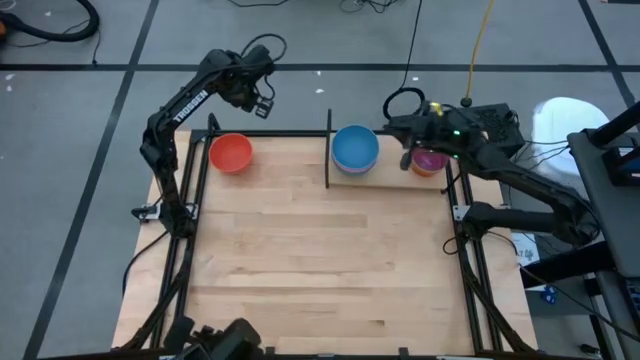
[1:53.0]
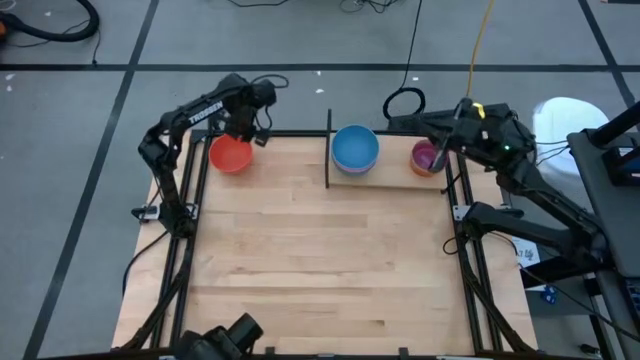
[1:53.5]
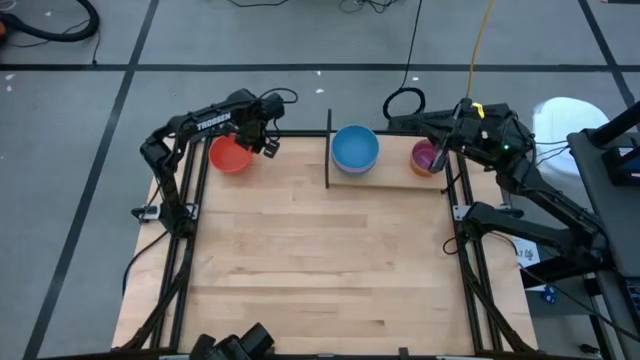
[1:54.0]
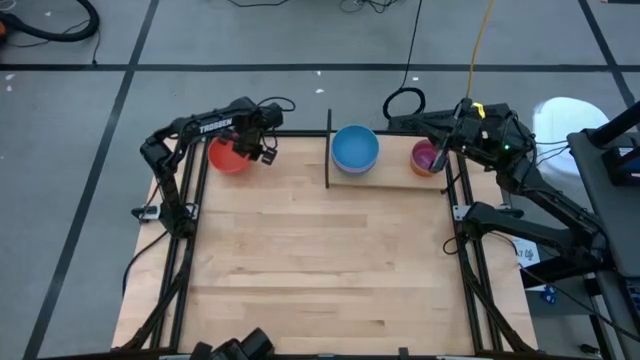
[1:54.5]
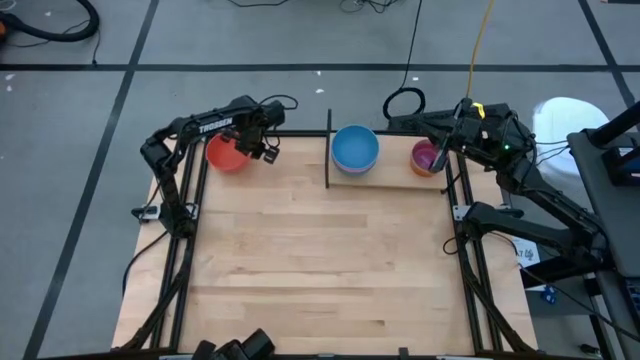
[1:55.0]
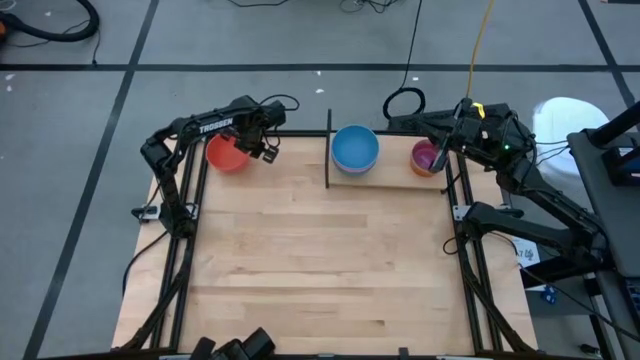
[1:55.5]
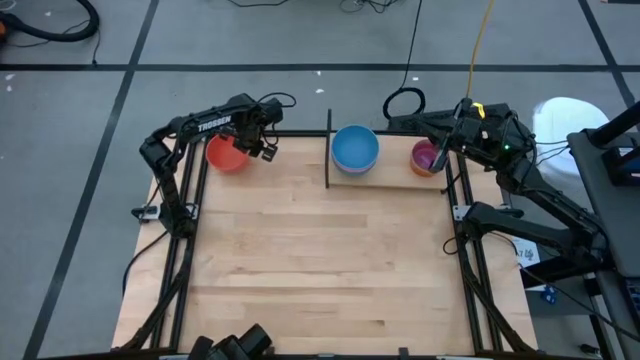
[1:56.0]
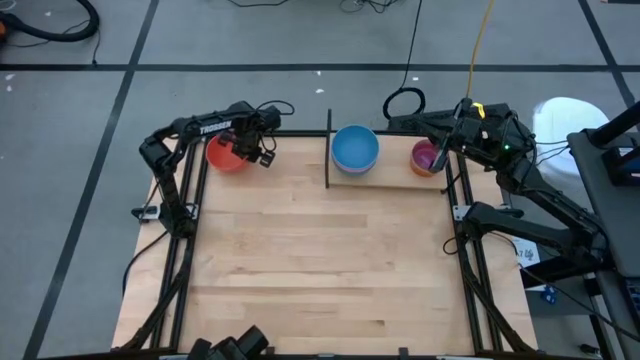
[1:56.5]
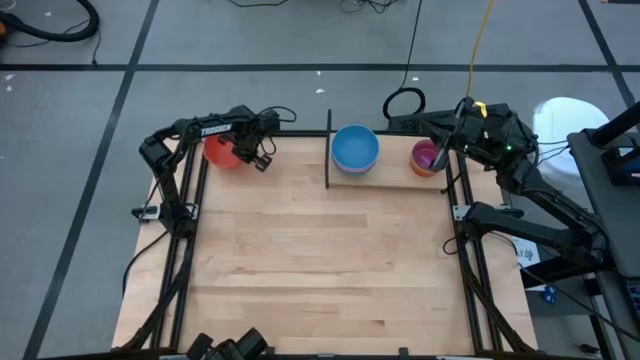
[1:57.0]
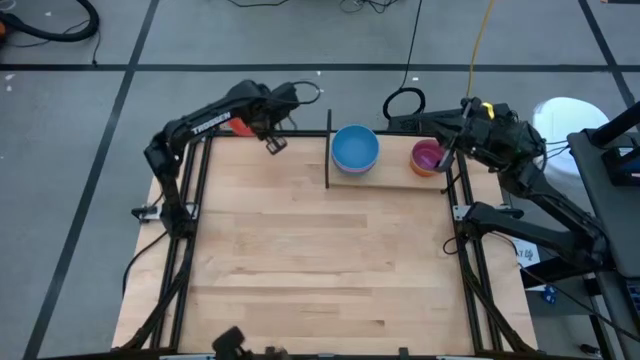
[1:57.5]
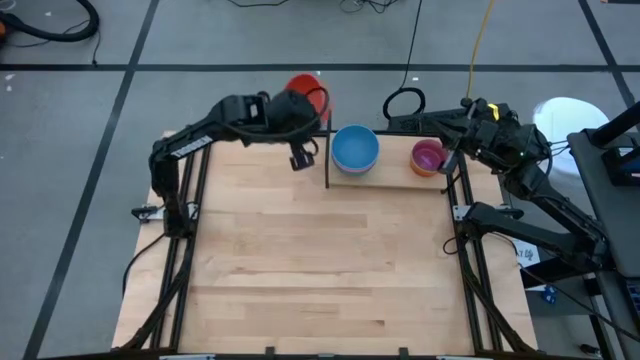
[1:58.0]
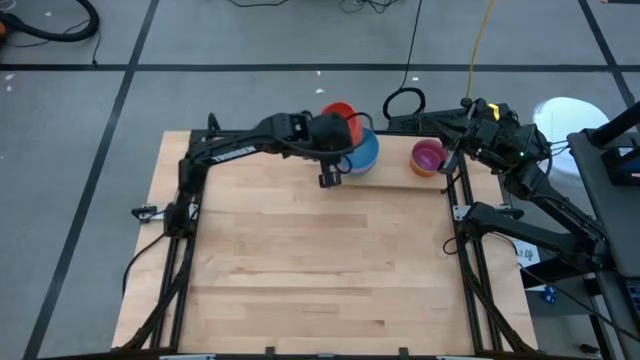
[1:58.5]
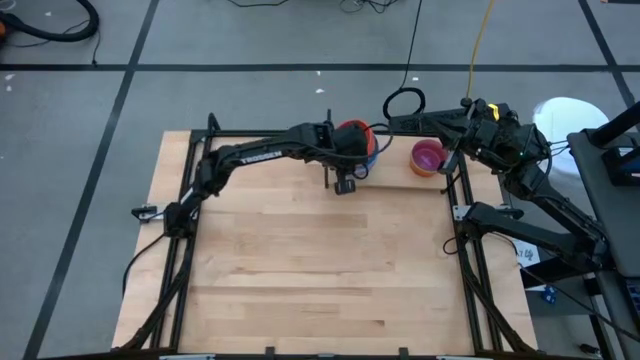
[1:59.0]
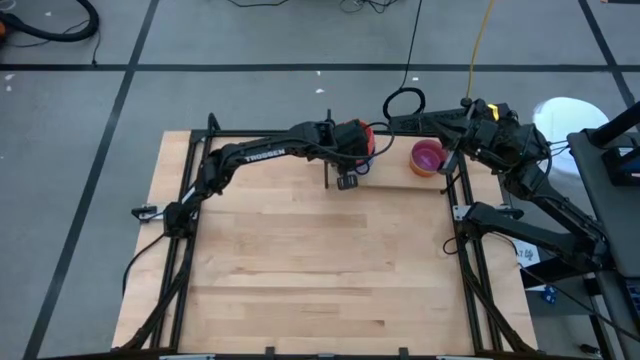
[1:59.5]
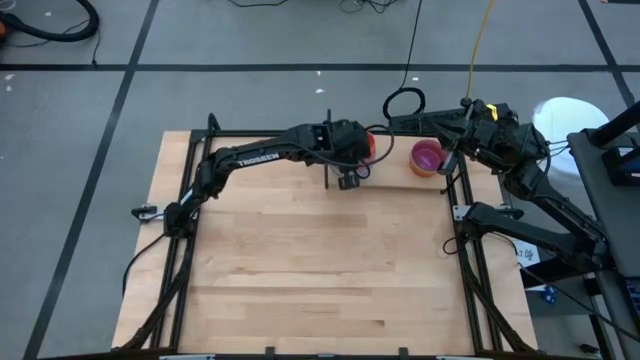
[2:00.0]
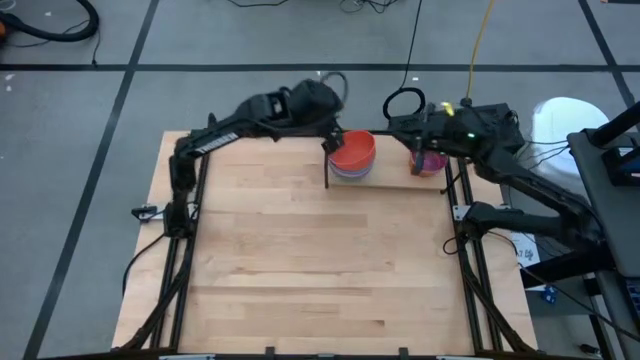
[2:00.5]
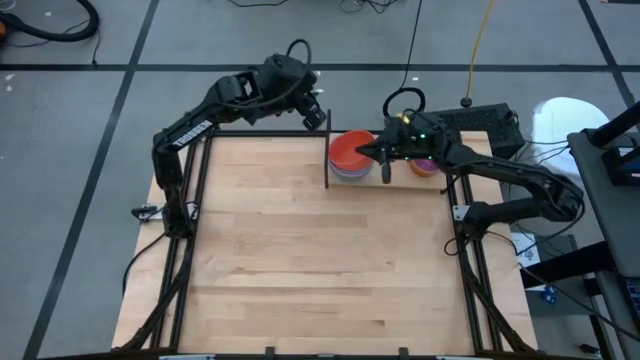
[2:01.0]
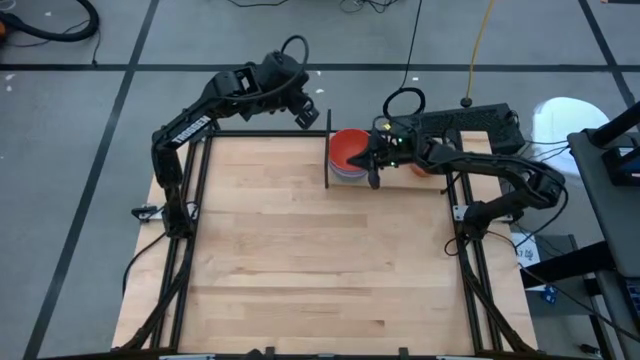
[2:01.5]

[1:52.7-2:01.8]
Task: Place and stack bowls onto a shelf
Stack the large orange bowl on top of the large blue bowl on the shelf

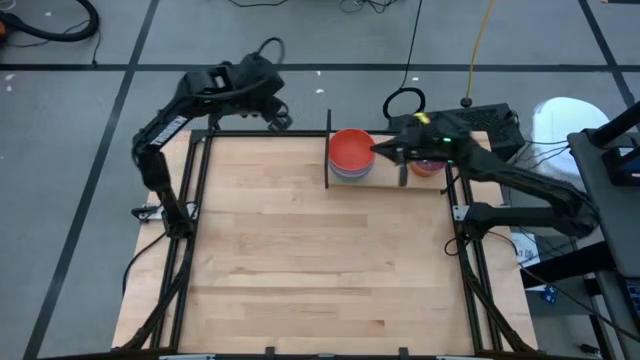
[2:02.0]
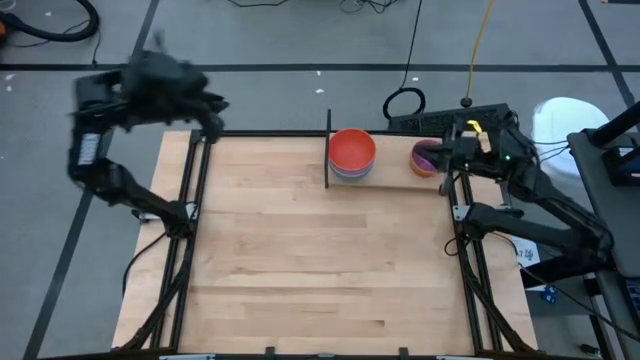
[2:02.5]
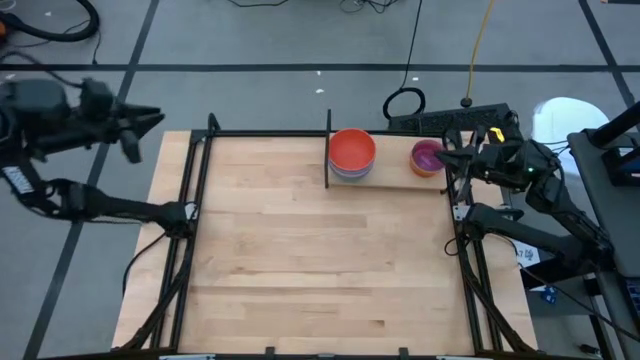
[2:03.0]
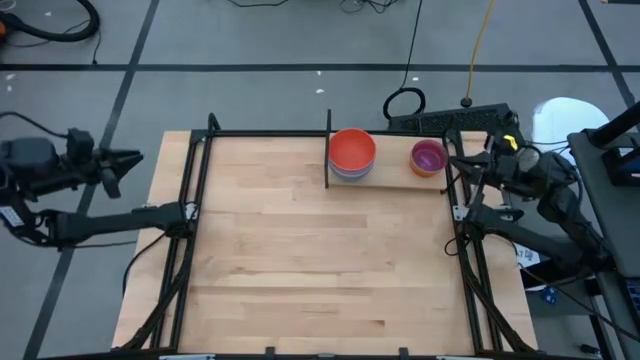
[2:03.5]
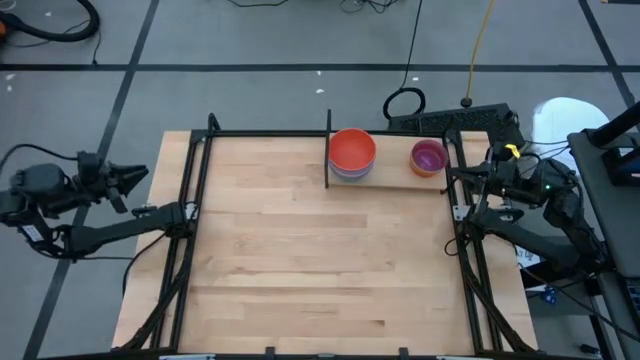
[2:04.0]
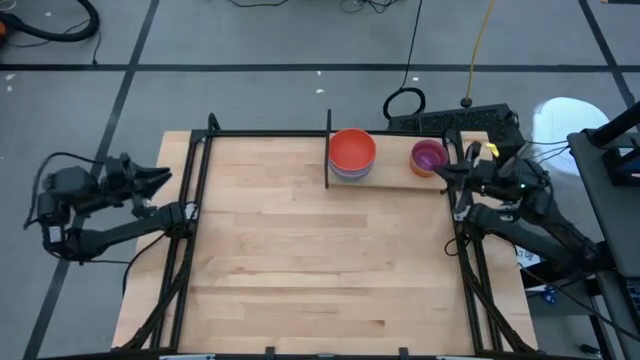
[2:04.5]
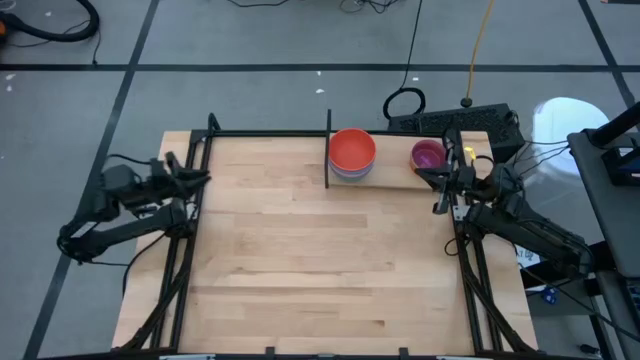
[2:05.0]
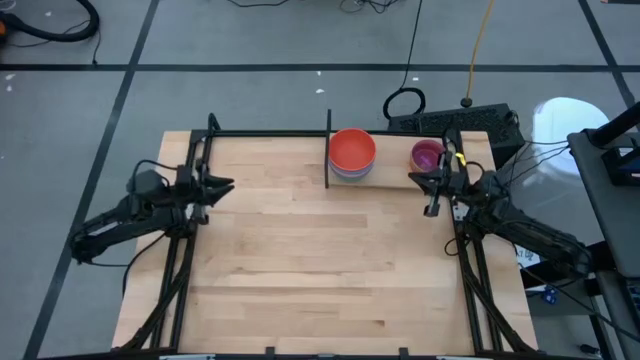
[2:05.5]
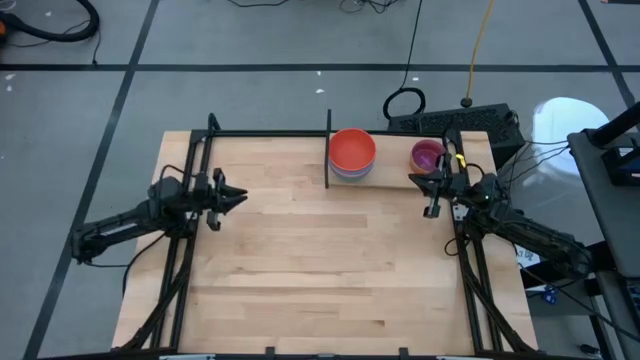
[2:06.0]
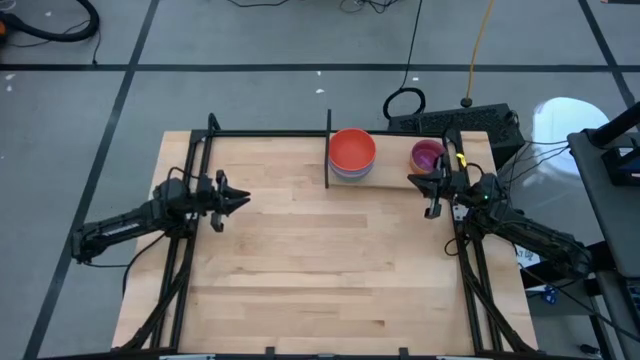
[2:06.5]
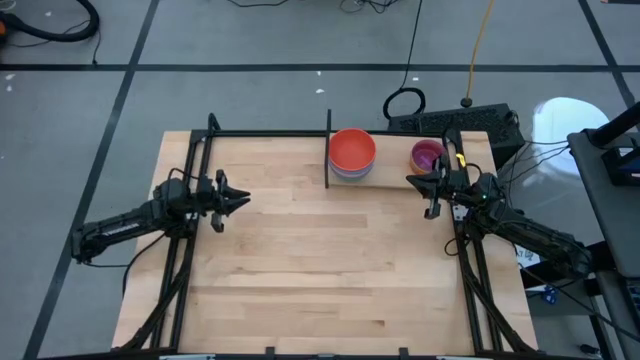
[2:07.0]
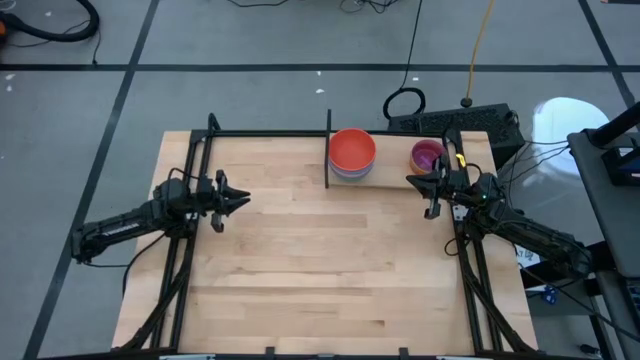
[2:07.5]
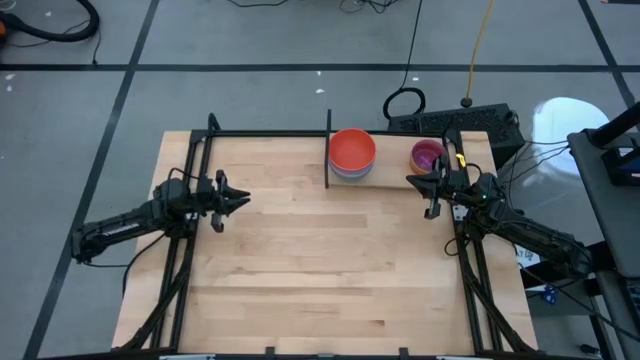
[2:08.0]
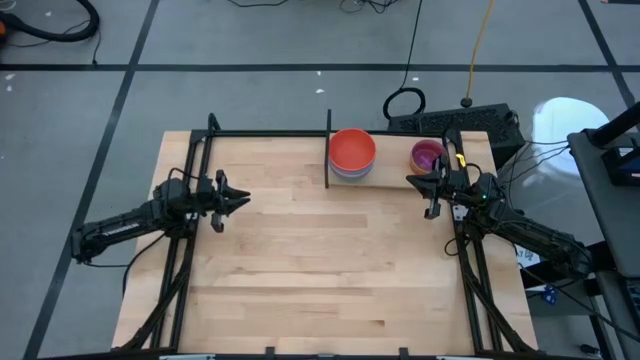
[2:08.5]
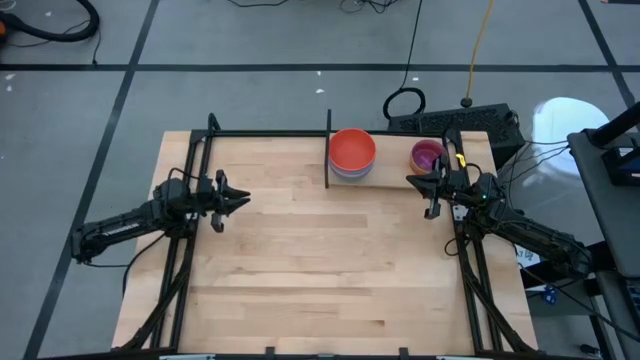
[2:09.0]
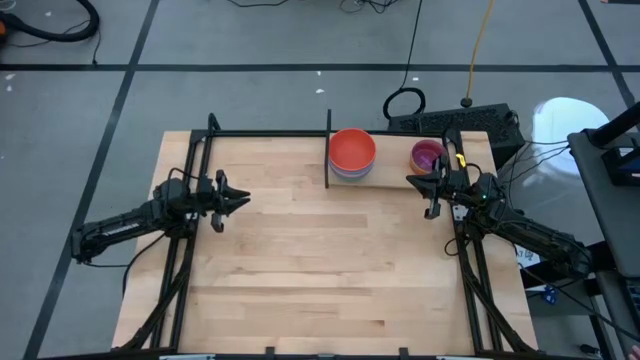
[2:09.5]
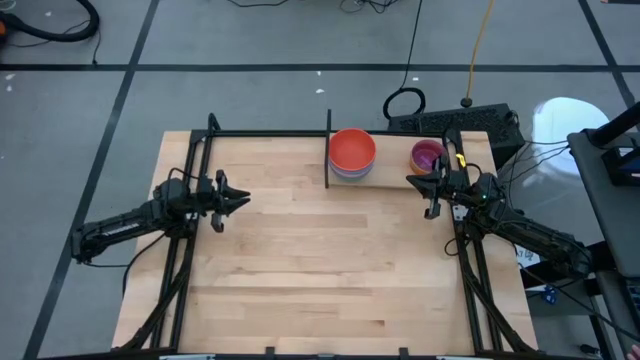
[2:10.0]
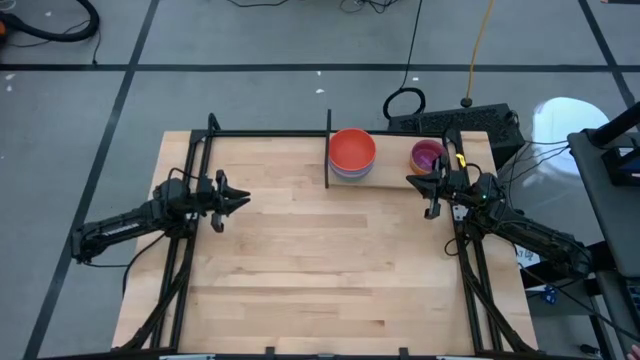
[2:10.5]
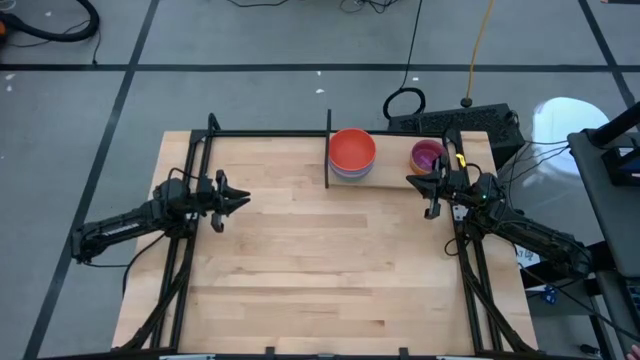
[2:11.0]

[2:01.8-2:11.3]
Return to Home Position

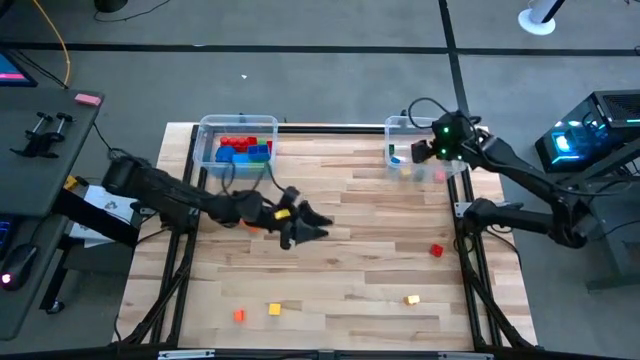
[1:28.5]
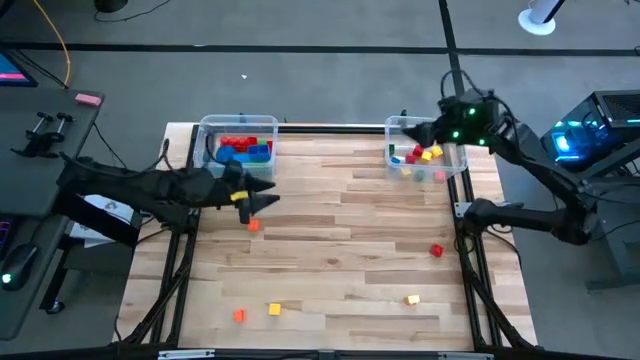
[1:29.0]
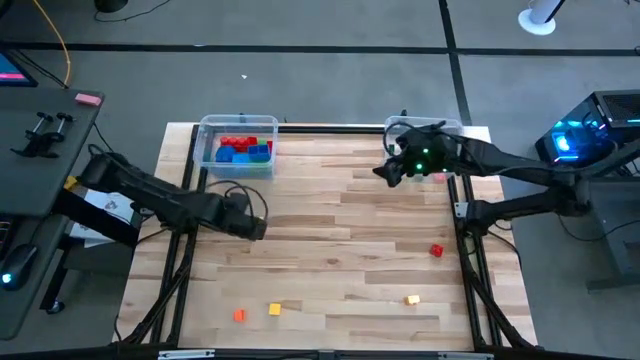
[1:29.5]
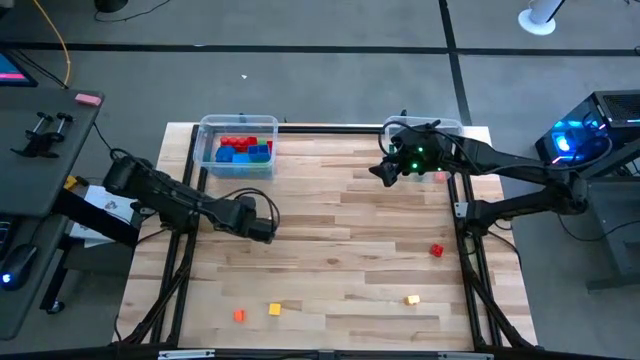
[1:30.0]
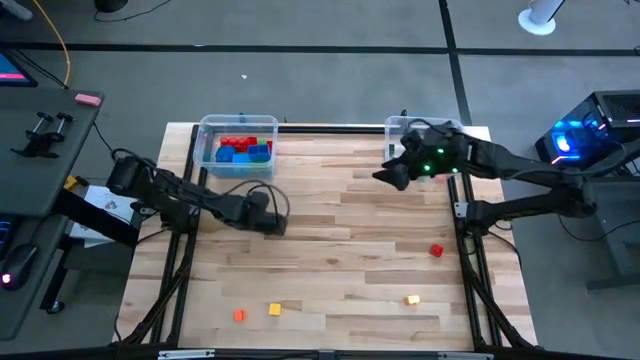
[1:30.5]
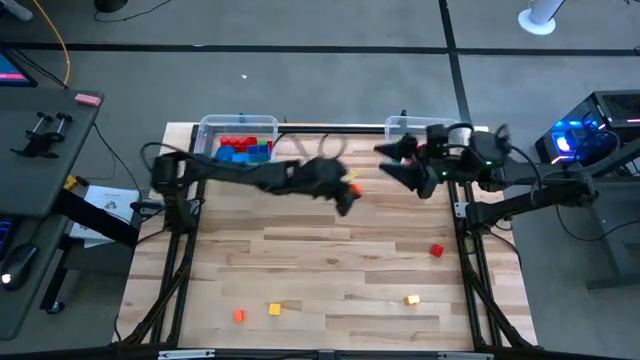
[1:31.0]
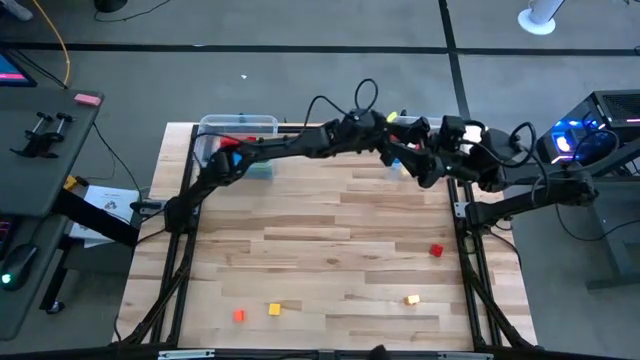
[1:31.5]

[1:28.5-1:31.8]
Task: Sort blocks by size
Put the small game piece into the right transparent bin
